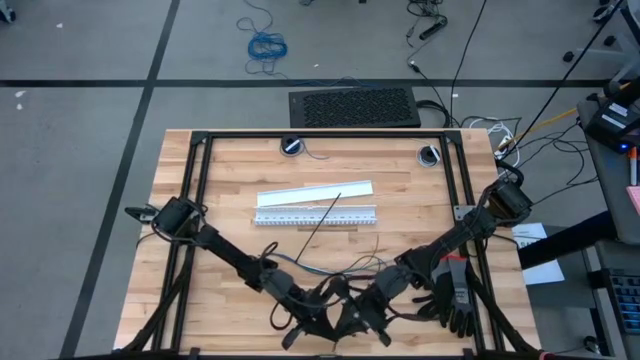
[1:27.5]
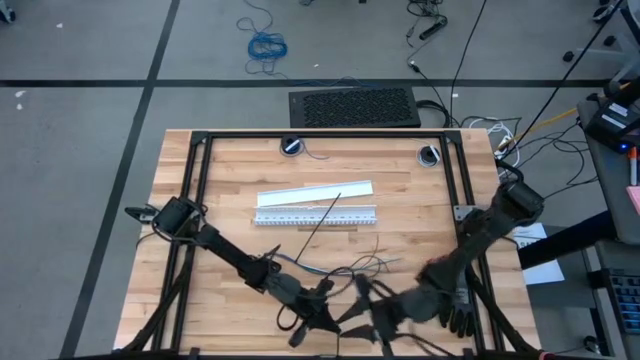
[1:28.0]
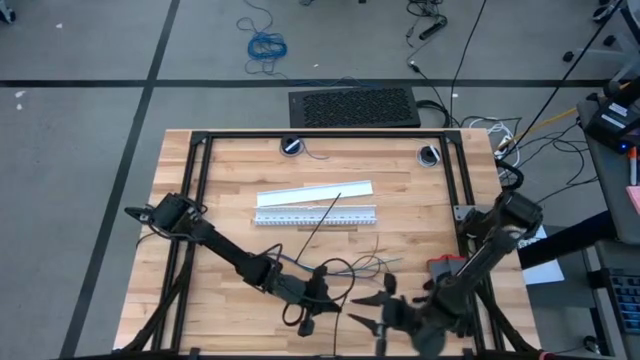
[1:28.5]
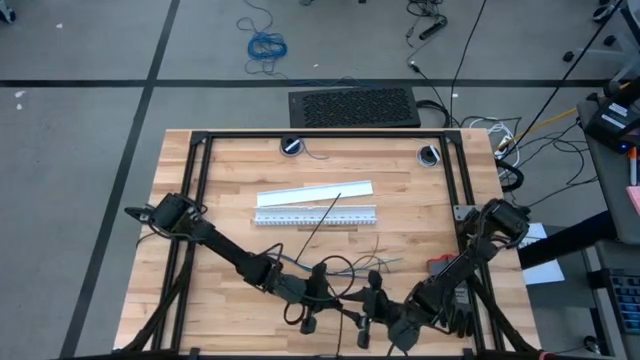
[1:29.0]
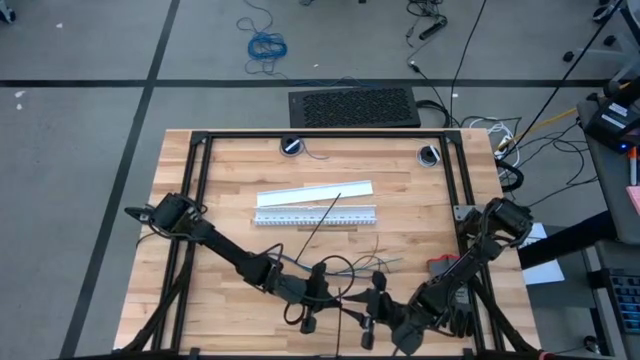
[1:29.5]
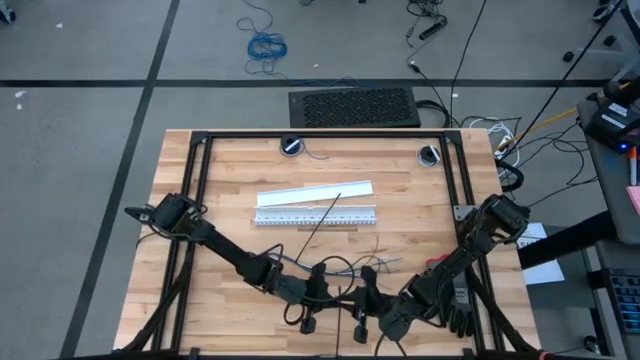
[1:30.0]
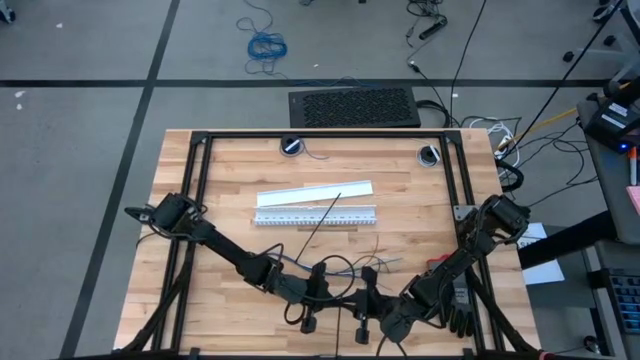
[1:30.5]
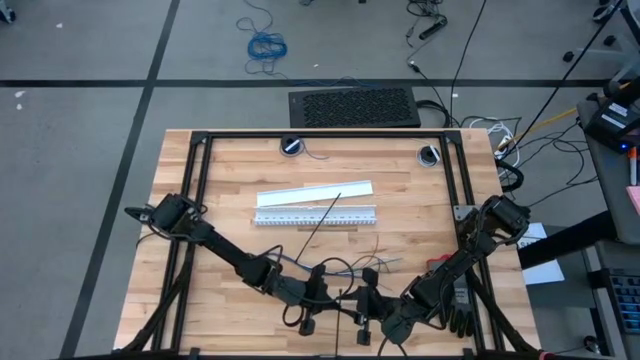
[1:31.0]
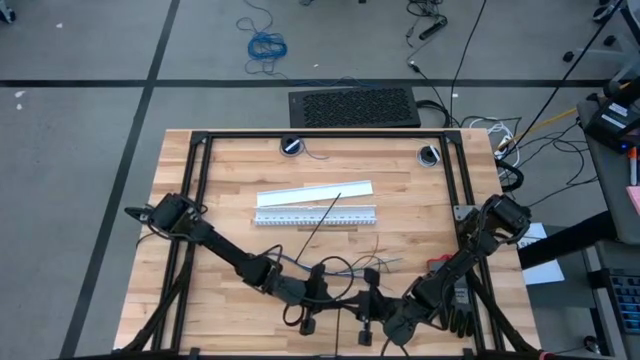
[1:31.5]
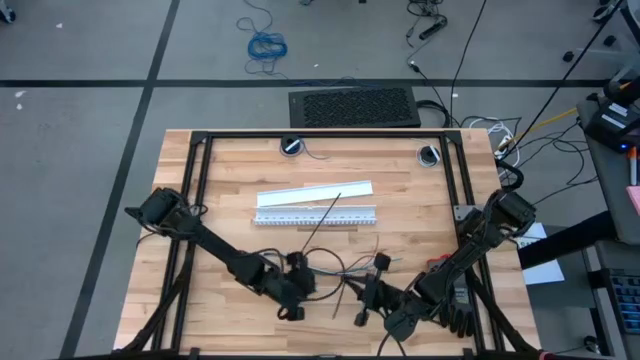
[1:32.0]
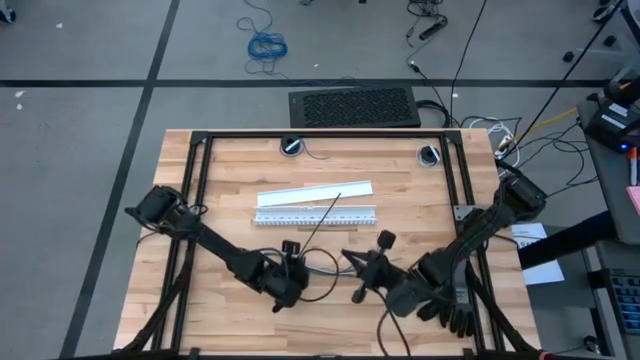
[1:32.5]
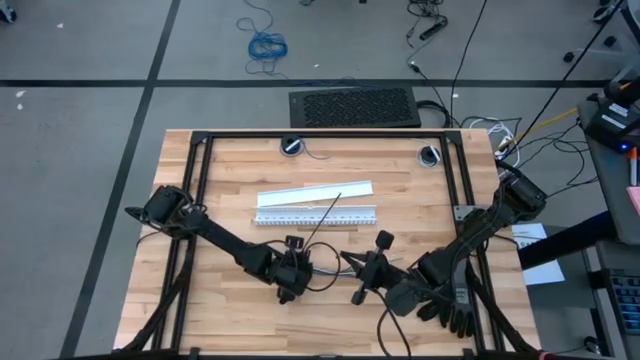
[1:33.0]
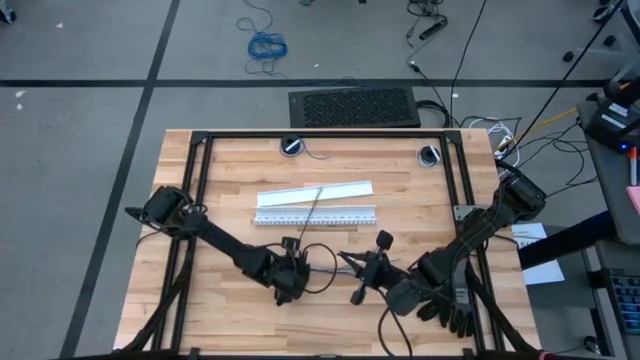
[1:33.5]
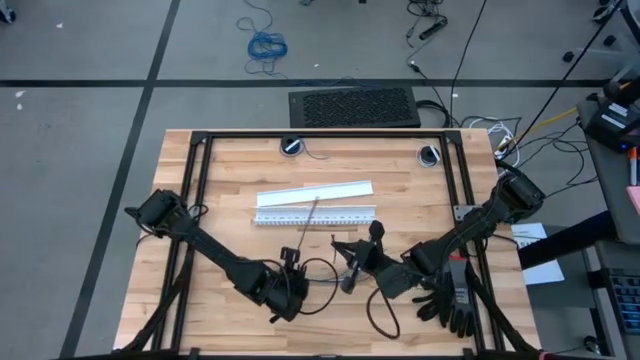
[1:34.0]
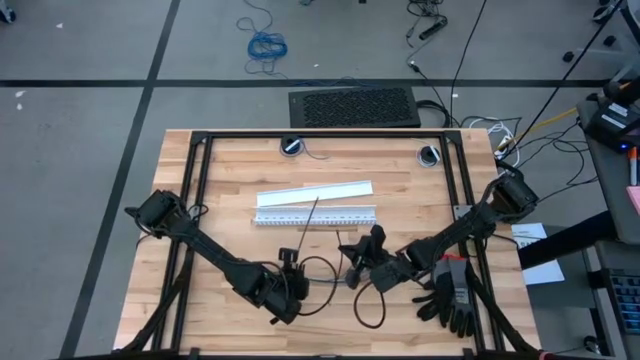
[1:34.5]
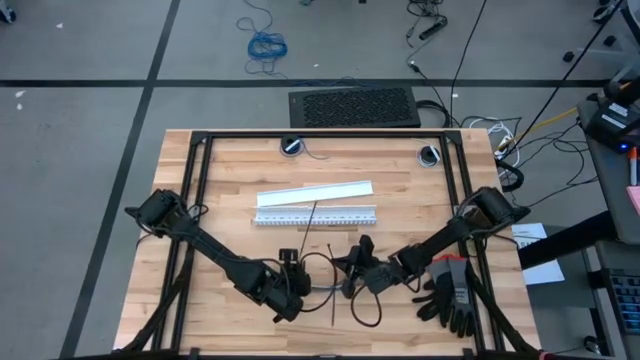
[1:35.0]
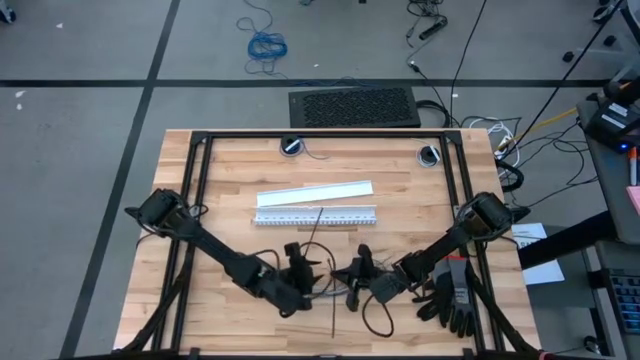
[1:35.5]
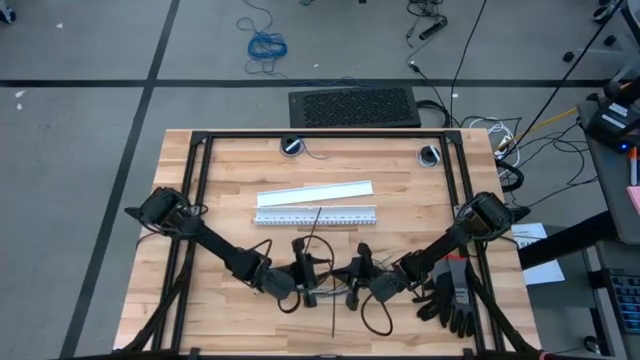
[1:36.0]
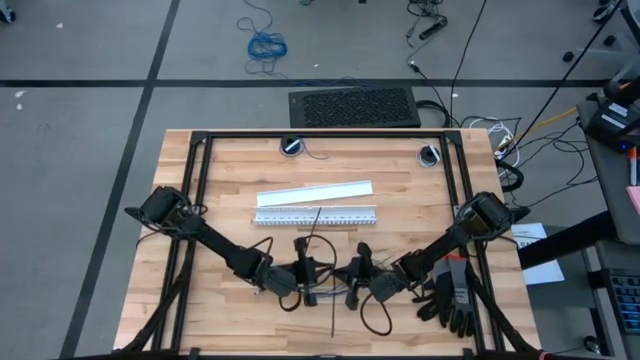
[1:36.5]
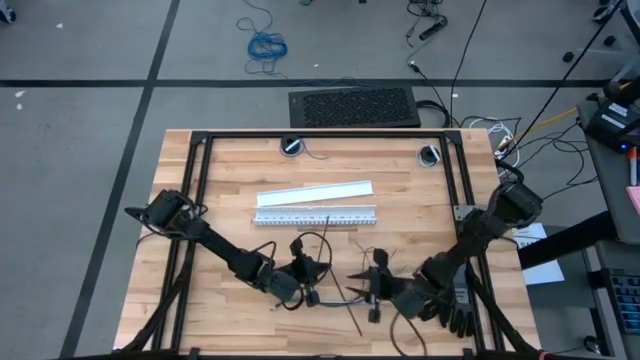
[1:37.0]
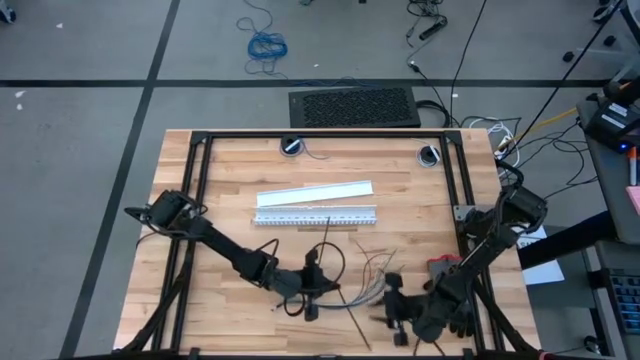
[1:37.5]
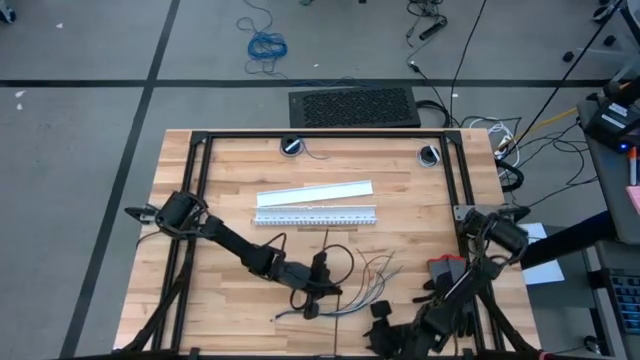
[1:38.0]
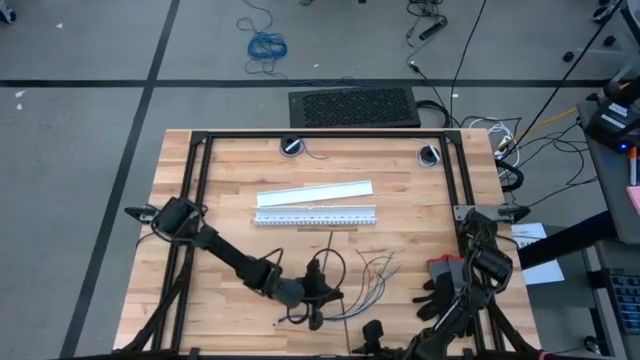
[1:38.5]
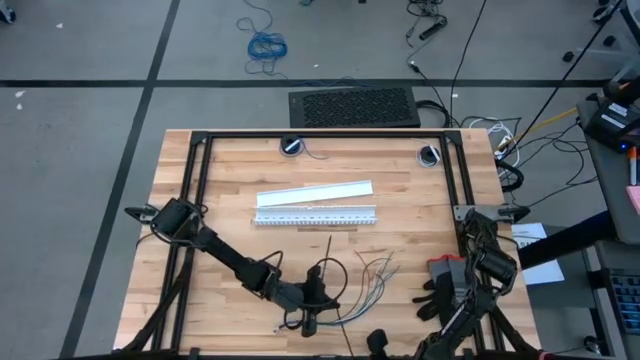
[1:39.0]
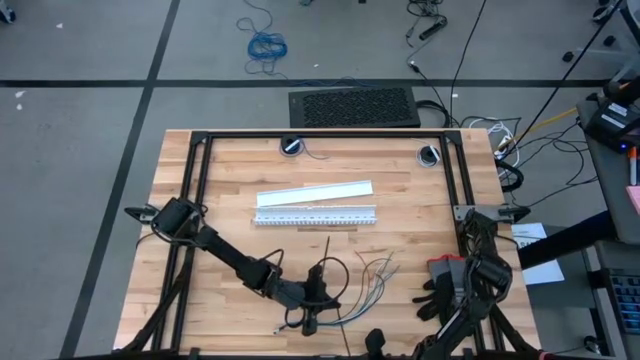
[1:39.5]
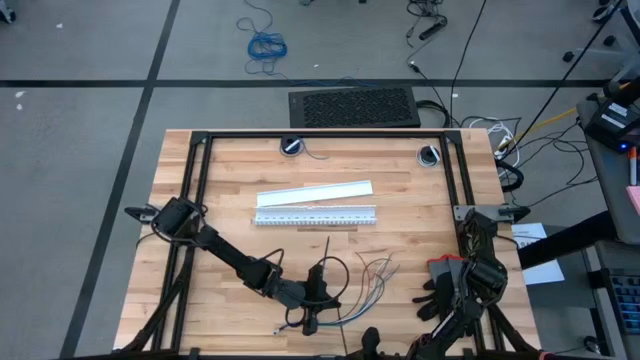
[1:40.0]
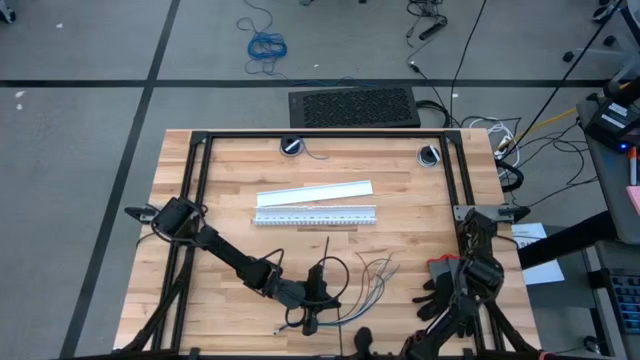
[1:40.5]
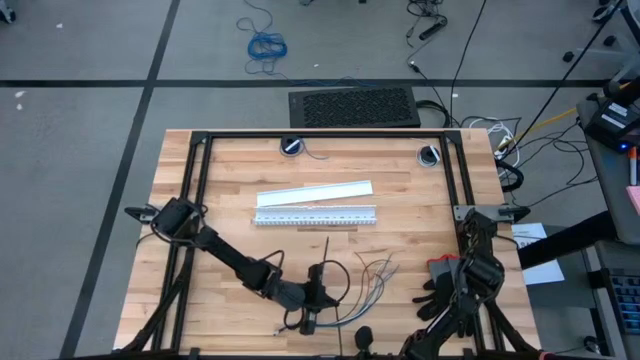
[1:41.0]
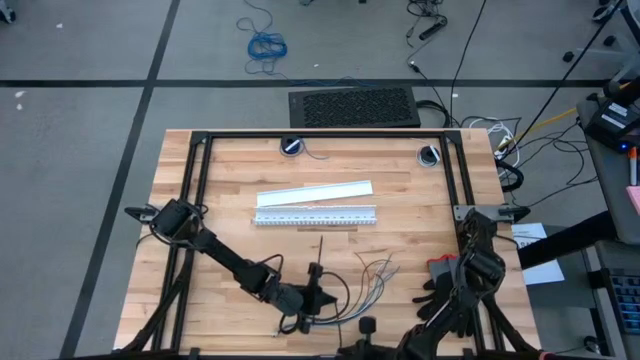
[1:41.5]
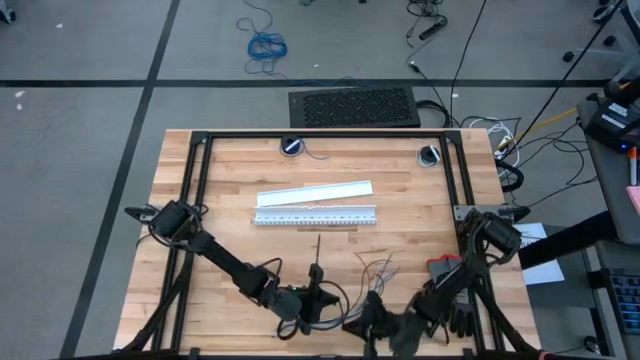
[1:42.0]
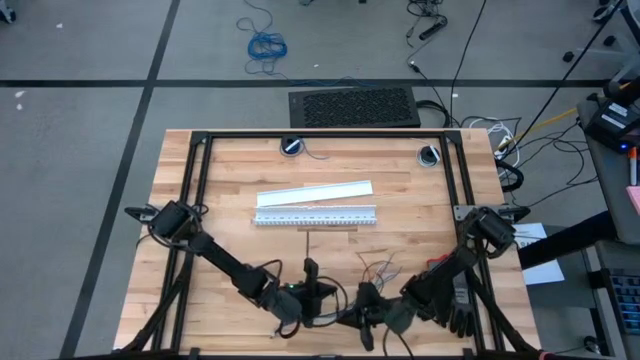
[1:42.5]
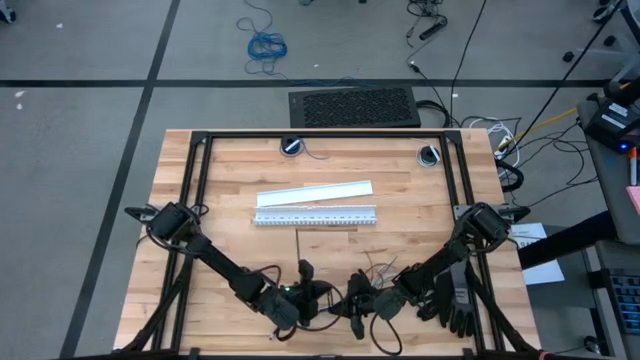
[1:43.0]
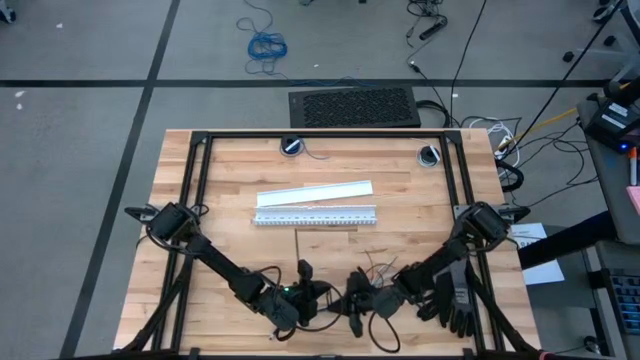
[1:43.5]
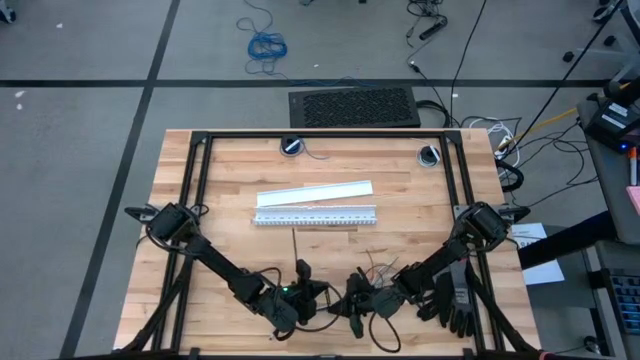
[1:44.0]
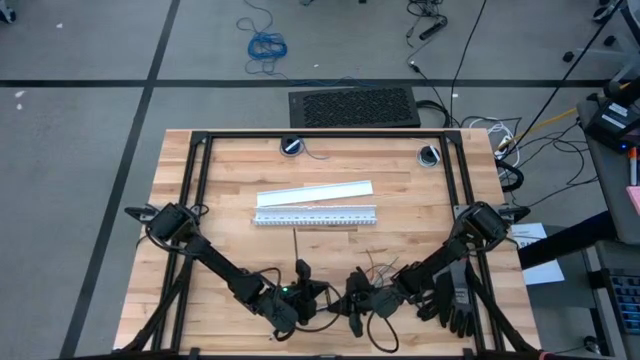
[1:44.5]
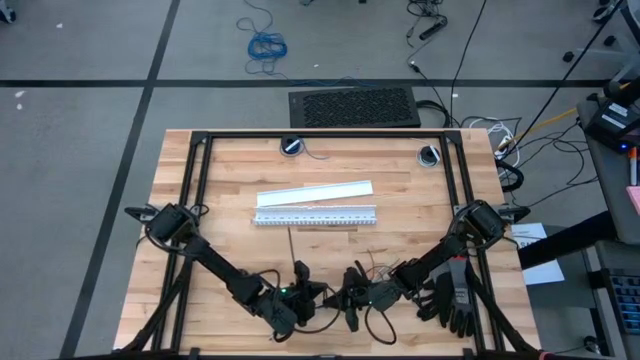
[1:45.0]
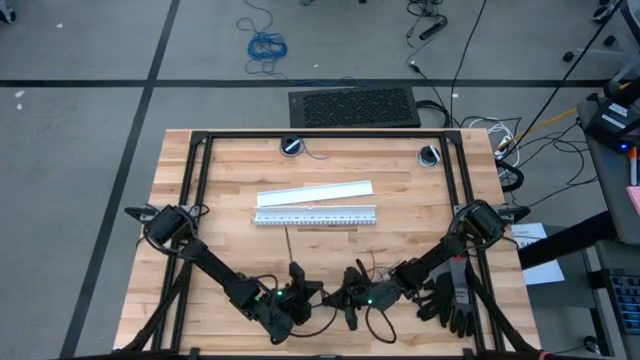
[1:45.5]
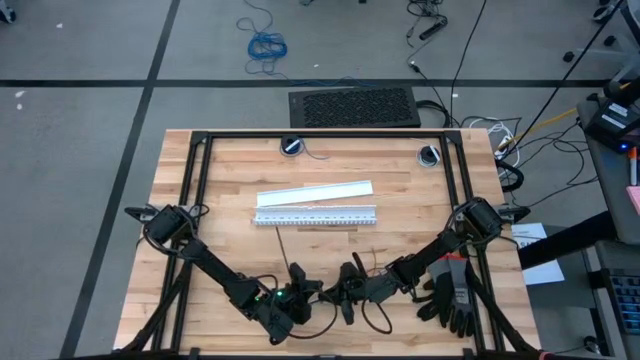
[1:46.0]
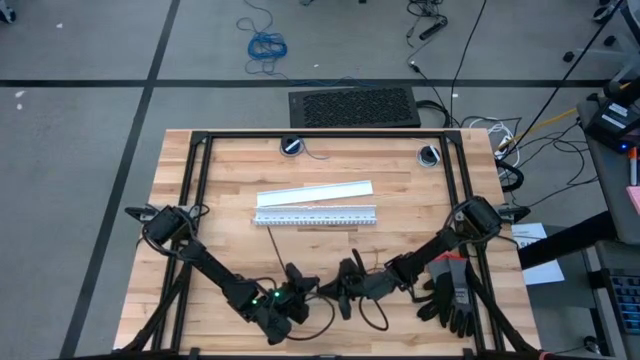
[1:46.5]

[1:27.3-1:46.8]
Task: Ziptie cables
Wrap the black zip tie around the colored cable wires

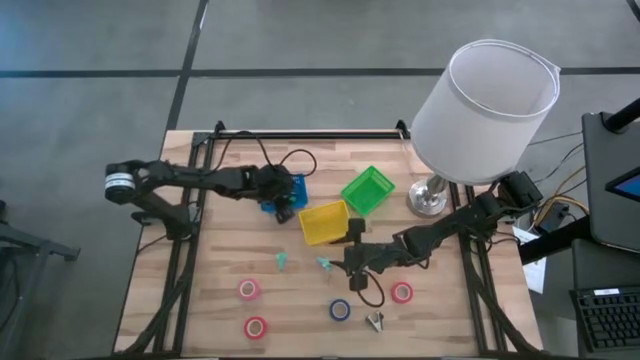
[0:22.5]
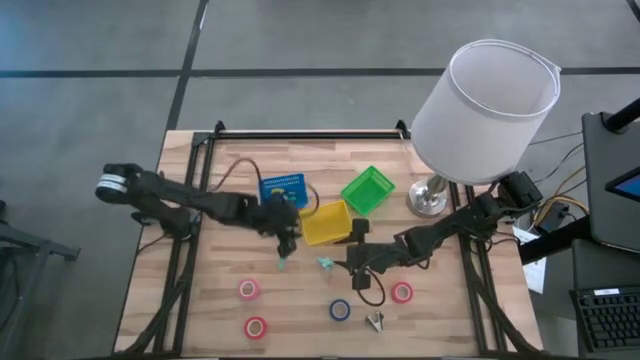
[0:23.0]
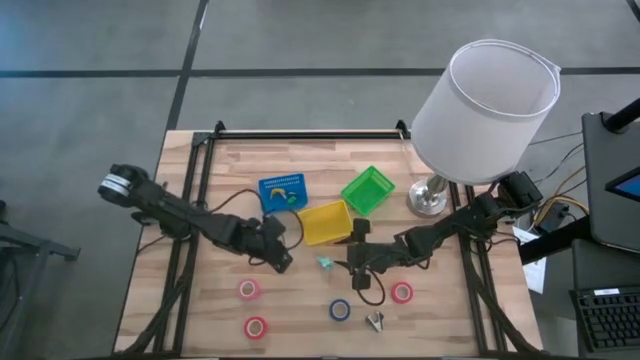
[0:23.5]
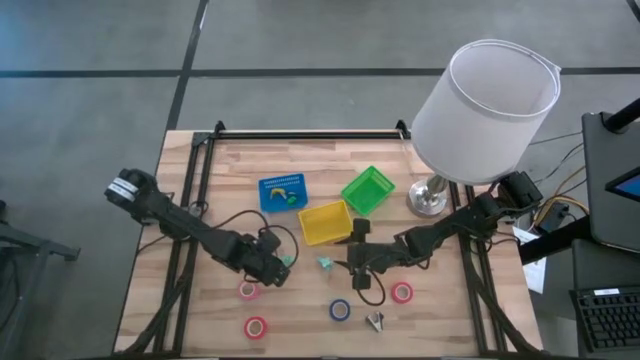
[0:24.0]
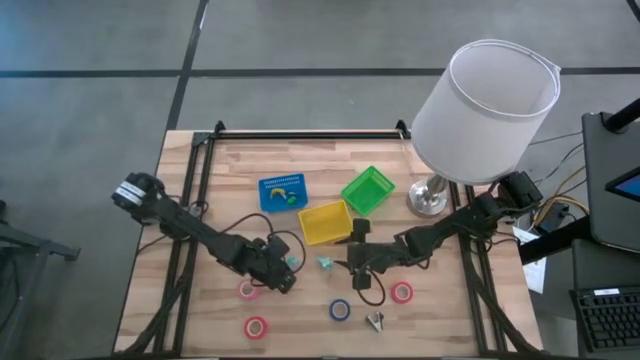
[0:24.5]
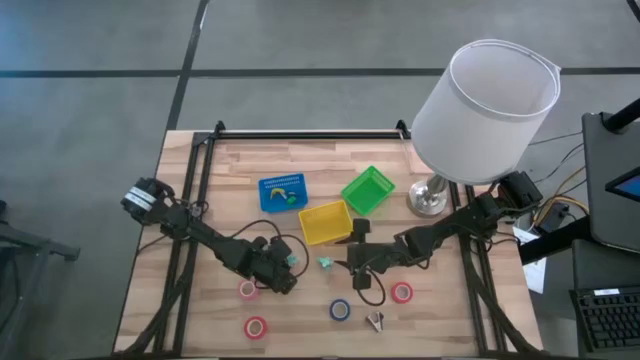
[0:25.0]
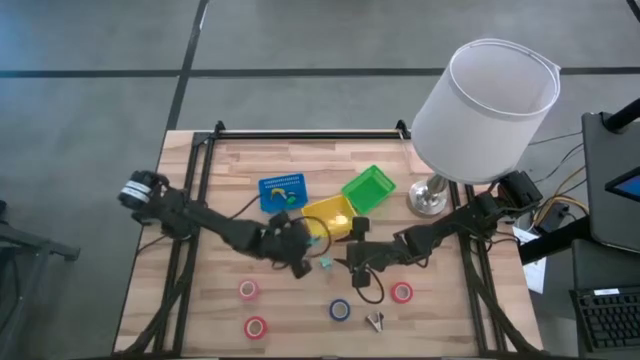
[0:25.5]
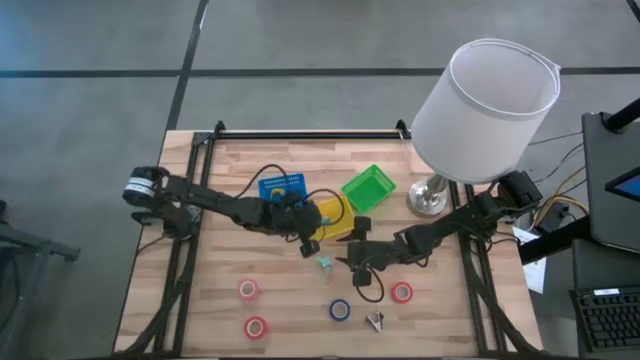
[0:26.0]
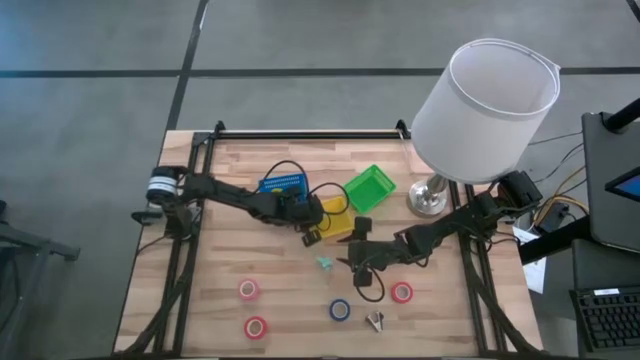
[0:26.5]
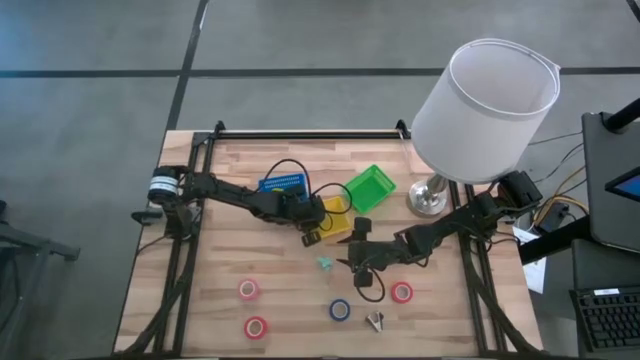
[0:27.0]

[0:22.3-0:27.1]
Task: Pick and place Stapler, Stapler remover, tape
Put the left light blue staple remover into the yellow bin
